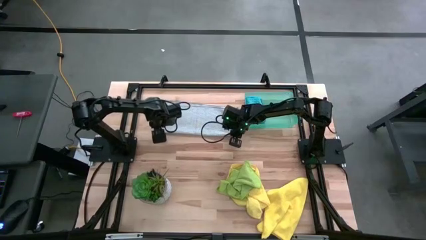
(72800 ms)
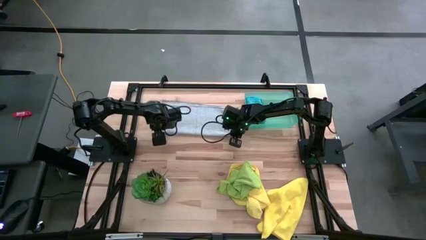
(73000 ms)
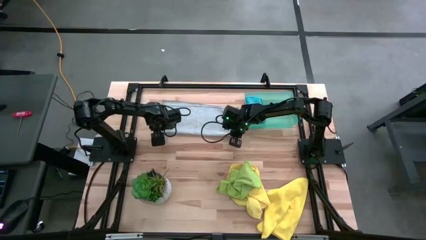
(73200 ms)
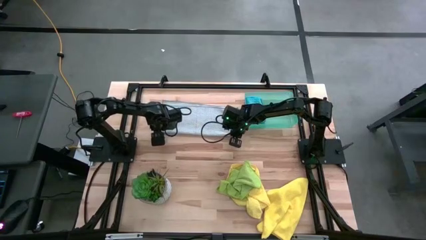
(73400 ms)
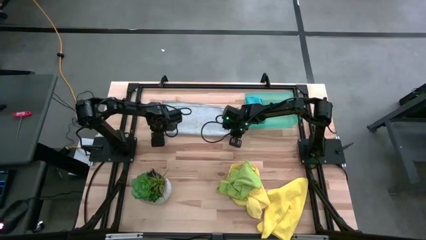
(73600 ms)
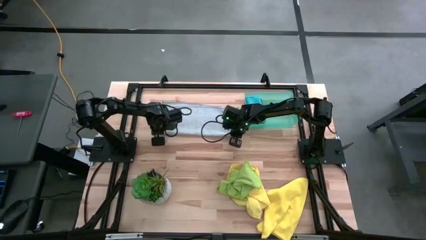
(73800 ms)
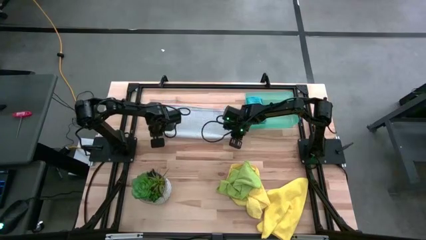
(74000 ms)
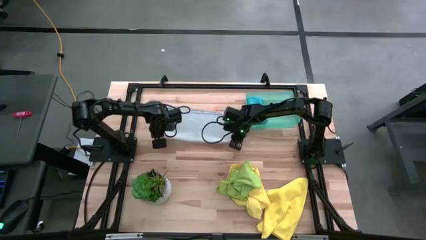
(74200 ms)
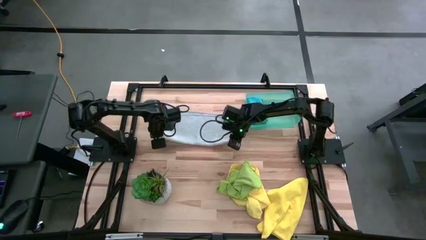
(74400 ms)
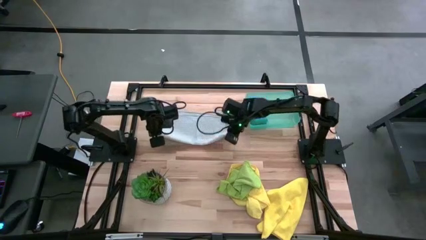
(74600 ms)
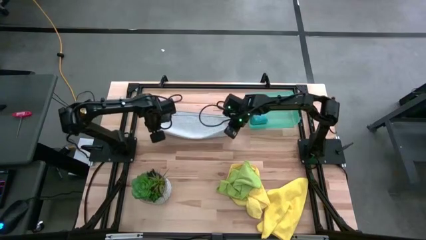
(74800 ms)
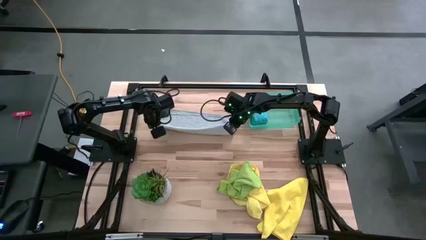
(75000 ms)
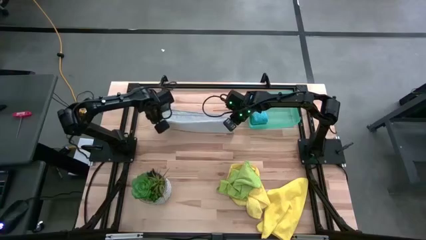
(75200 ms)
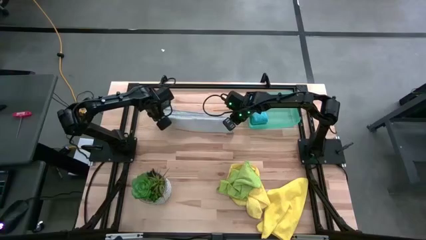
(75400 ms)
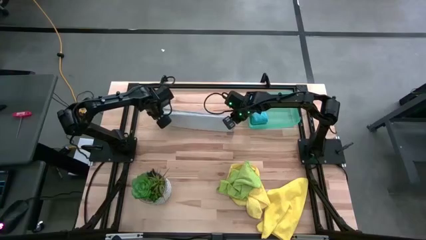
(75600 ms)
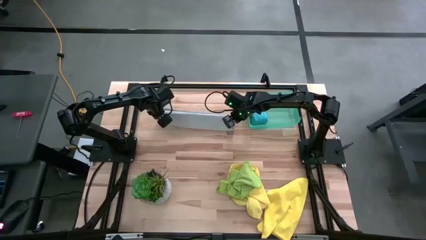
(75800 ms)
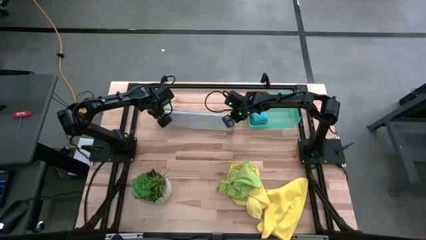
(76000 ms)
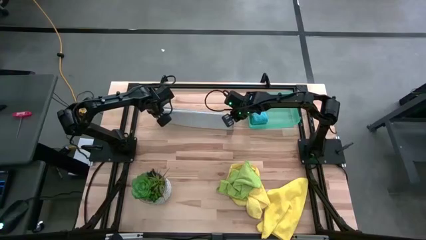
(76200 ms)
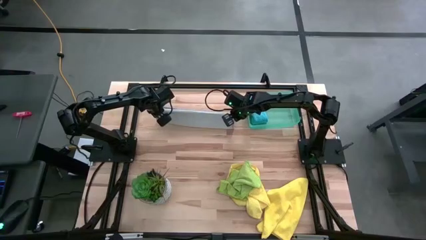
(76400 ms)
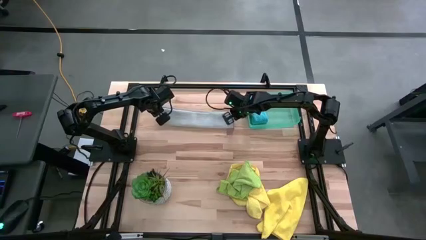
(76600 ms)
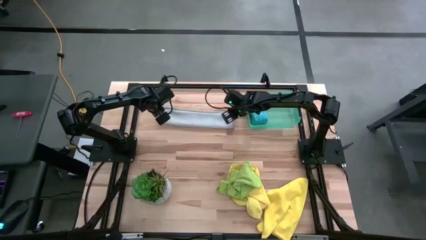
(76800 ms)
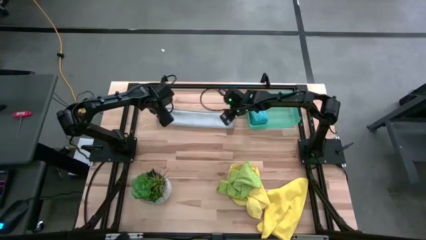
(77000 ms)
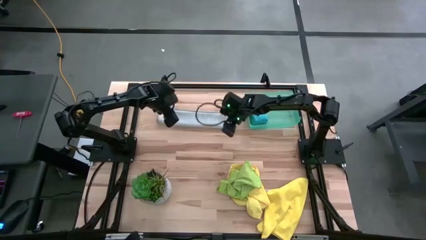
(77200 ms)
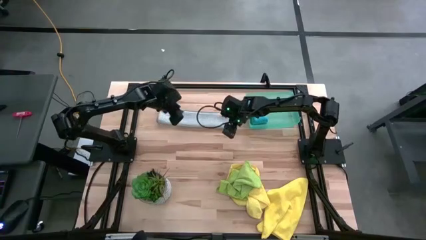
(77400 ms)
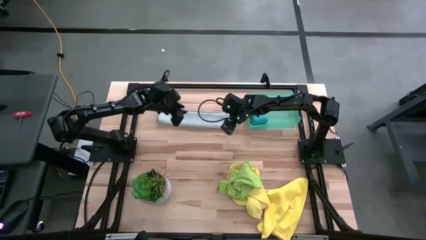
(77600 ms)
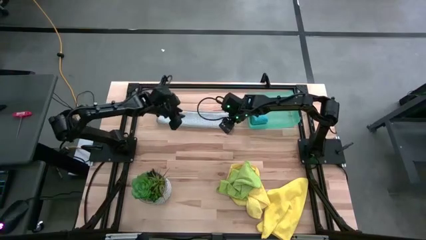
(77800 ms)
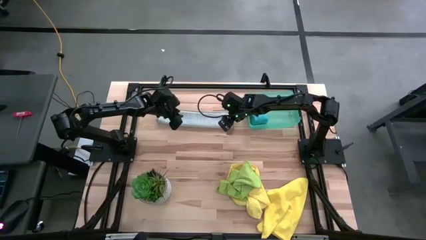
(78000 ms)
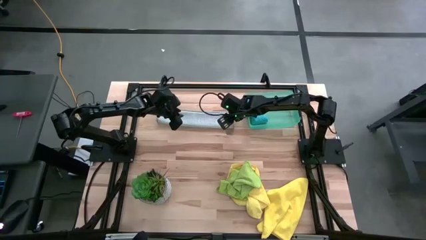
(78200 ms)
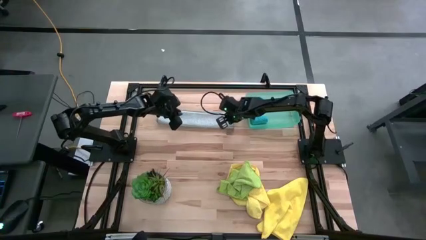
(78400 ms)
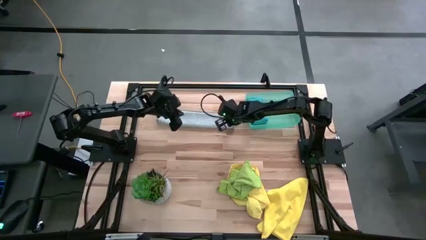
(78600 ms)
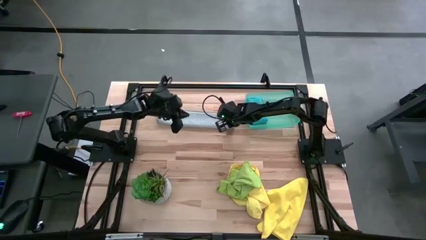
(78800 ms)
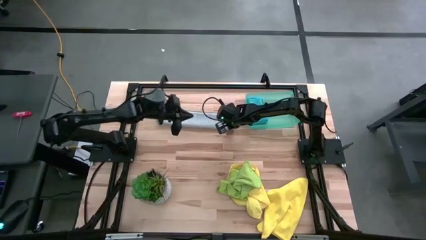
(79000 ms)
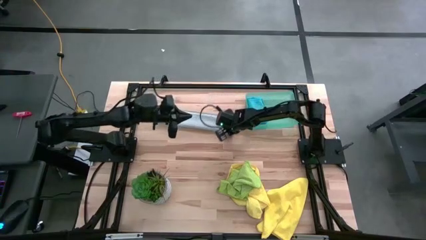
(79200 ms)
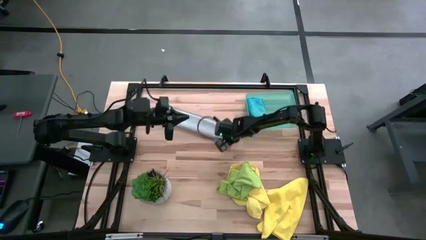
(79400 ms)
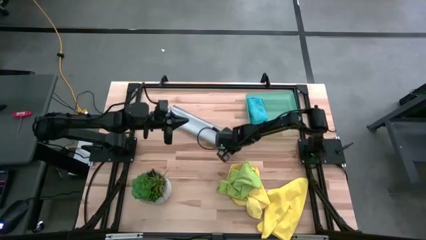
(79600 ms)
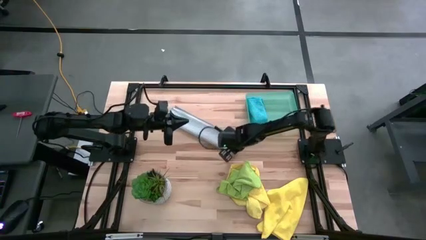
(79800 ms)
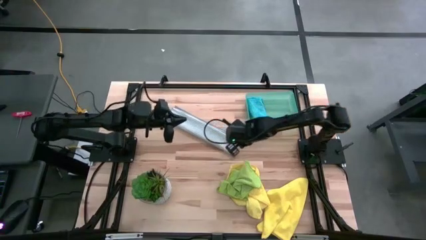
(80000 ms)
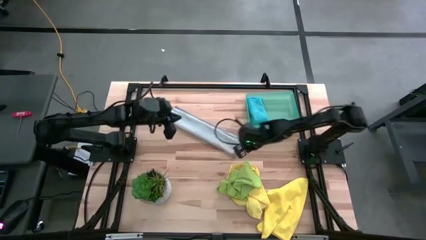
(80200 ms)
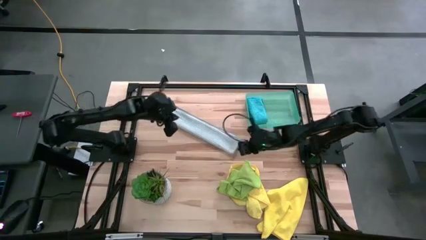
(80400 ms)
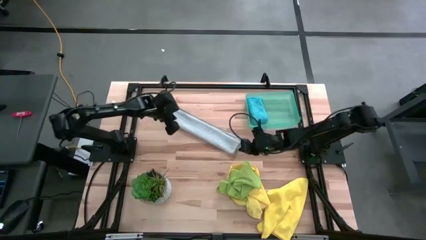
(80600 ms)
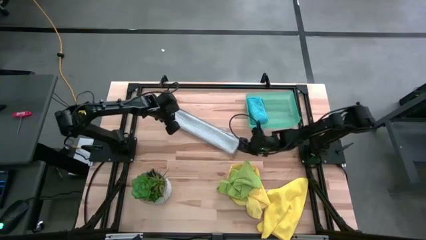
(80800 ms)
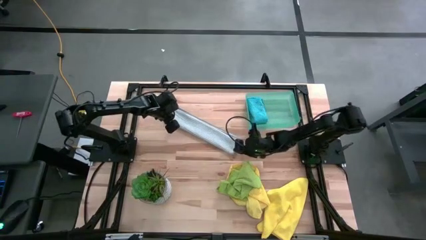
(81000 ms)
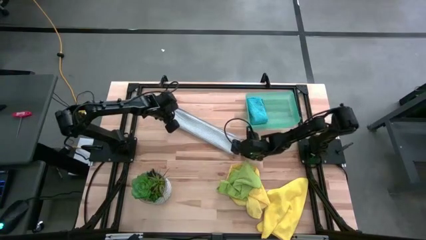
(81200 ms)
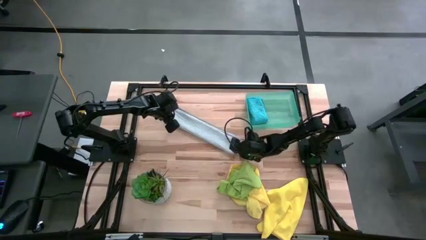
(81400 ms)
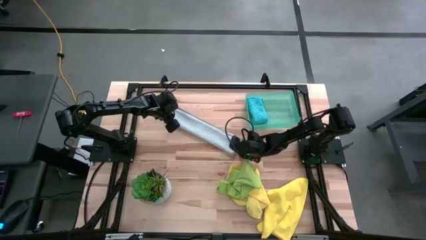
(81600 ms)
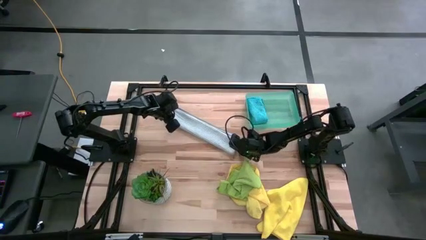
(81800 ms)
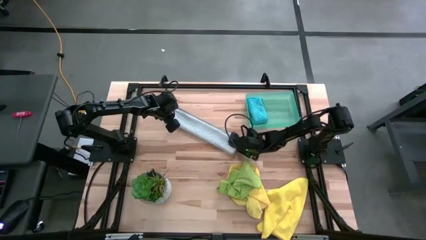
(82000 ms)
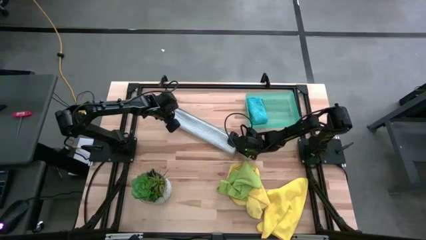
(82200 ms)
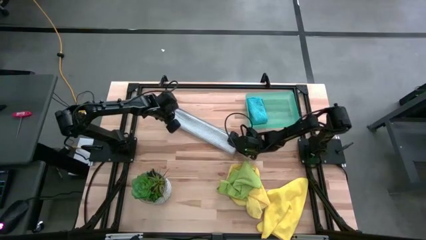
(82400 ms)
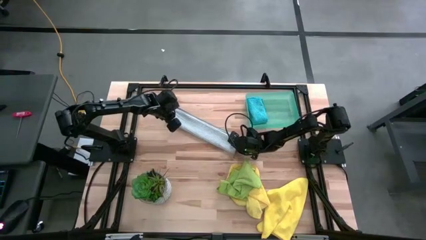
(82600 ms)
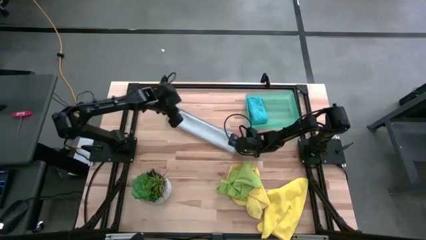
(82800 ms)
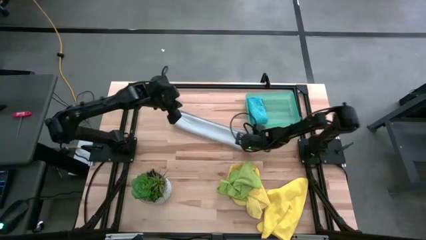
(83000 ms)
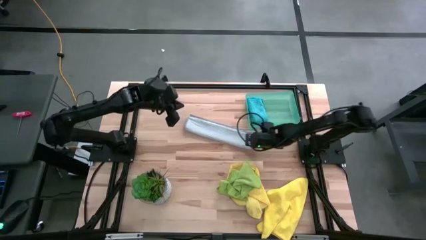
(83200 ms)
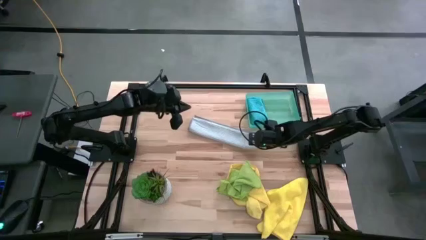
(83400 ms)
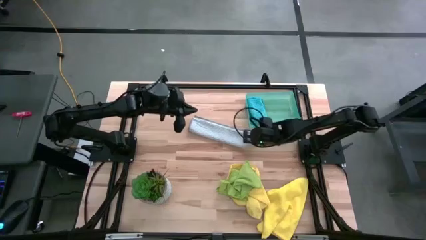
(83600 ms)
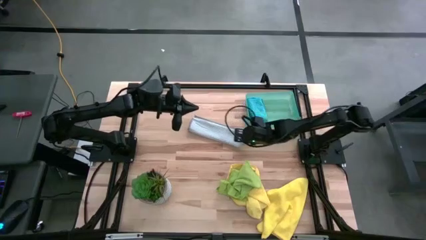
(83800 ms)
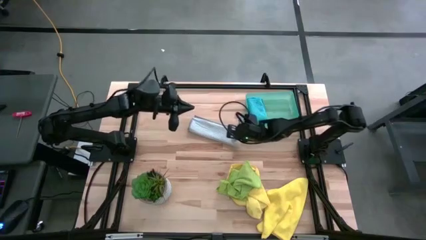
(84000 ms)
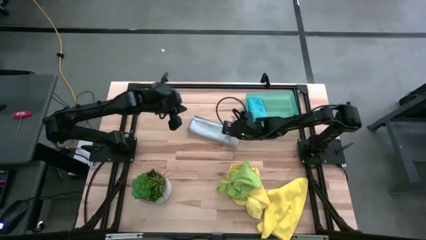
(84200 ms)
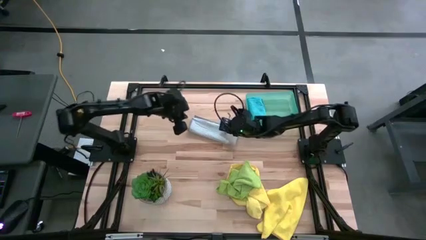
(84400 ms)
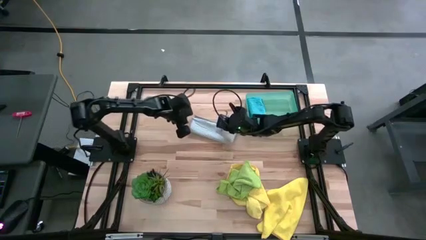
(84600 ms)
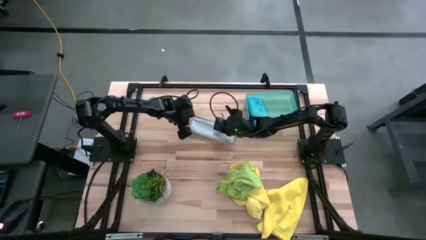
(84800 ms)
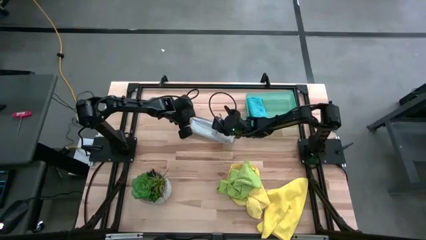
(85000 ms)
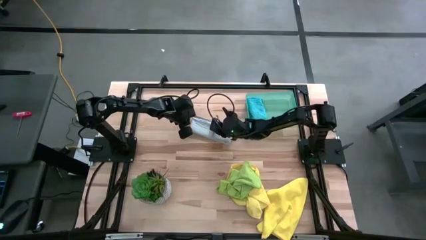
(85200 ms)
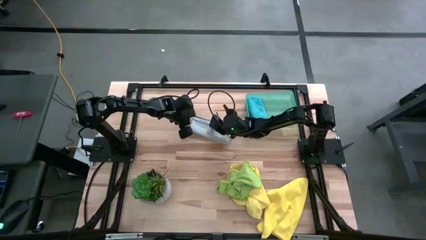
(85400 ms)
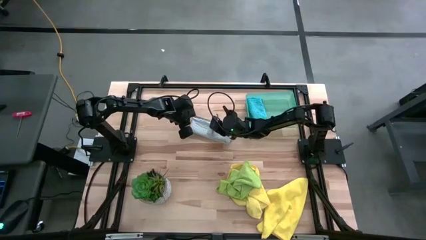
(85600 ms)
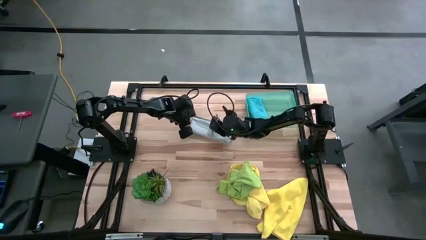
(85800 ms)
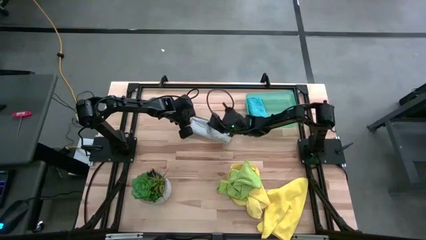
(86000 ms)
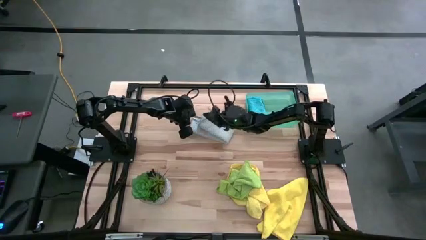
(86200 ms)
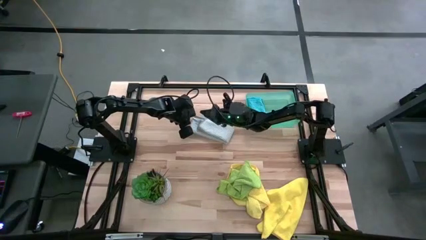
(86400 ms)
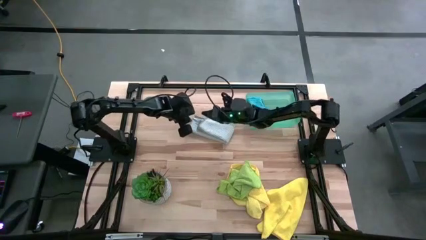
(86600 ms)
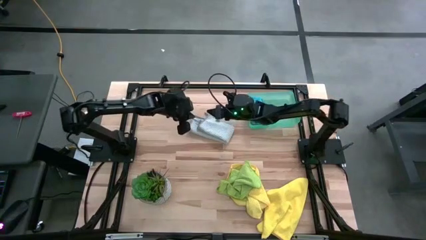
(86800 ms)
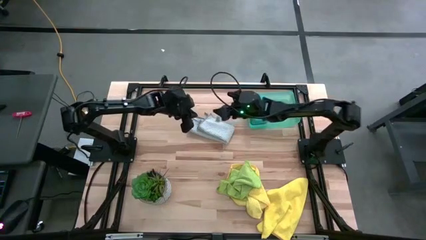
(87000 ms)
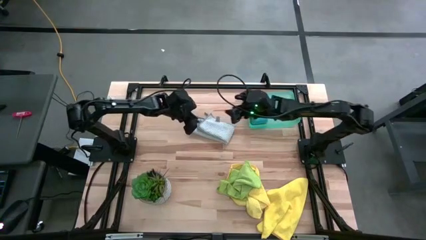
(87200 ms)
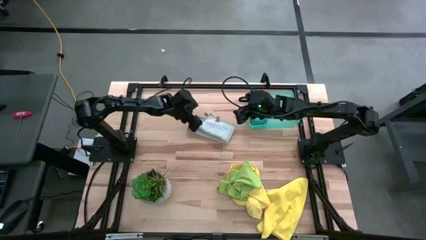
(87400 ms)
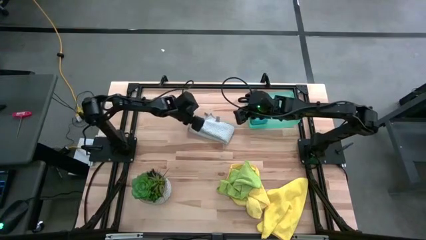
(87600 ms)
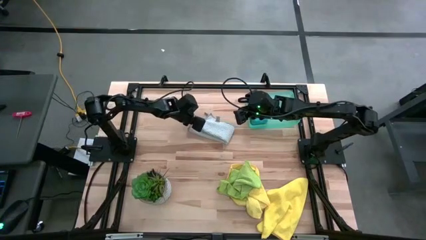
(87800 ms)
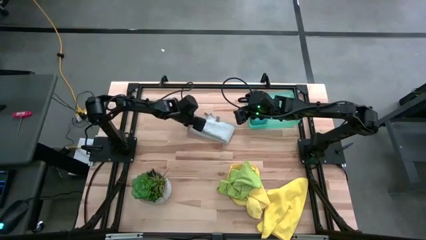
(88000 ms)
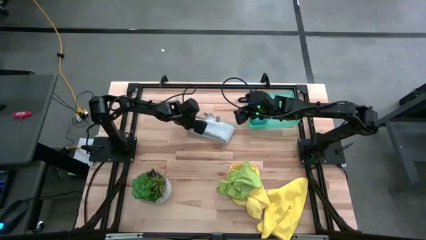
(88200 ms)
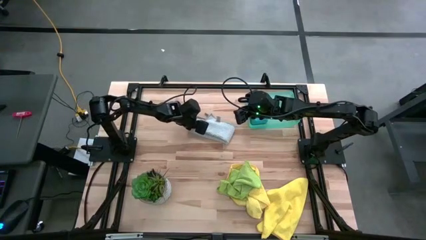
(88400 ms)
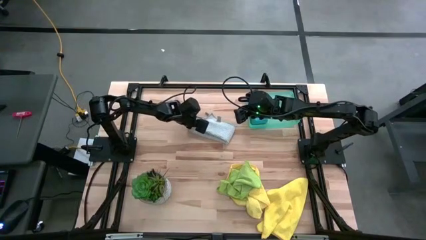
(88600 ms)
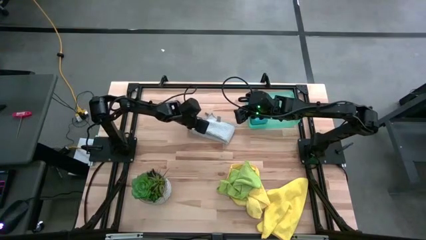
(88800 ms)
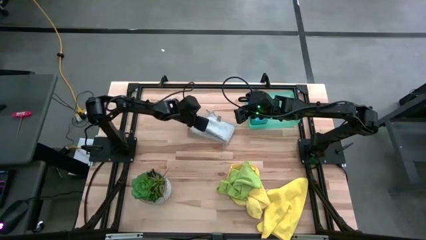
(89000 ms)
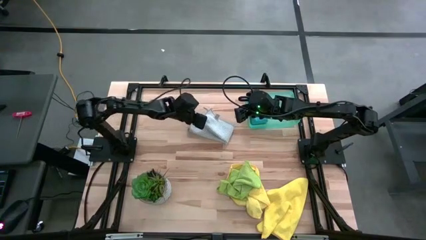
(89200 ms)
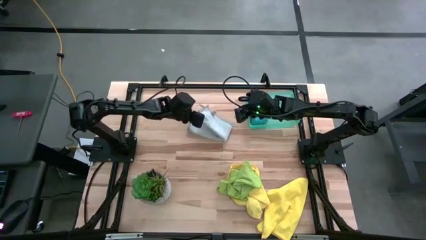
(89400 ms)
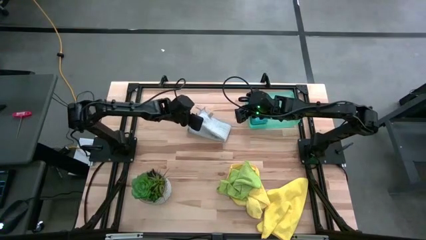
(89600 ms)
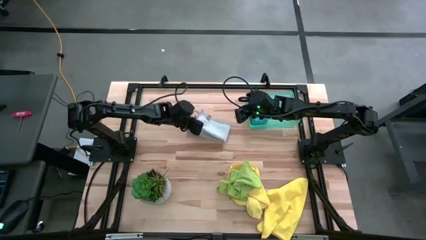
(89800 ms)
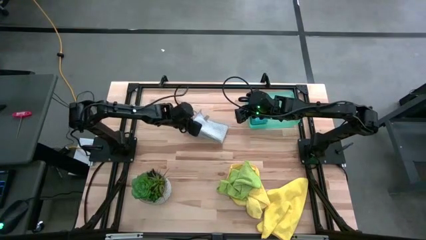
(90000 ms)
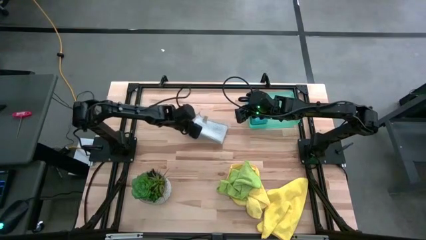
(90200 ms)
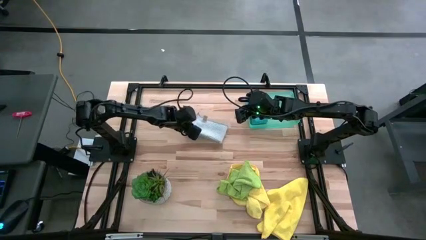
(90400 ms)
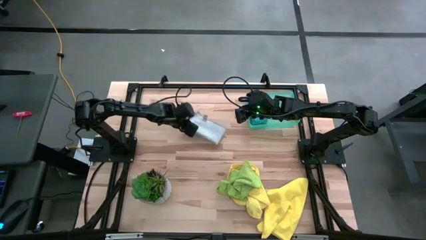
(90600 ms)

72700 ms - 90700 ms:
Task: Fold microfiber towels
Fold the gray towel
